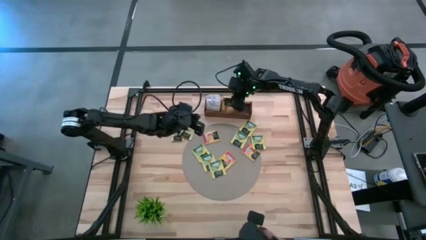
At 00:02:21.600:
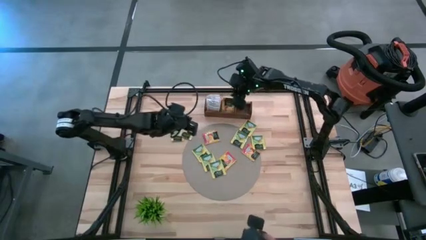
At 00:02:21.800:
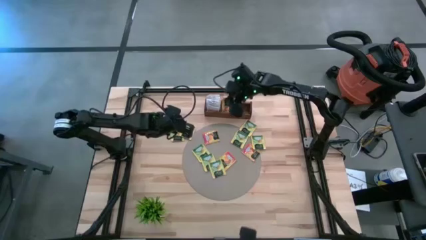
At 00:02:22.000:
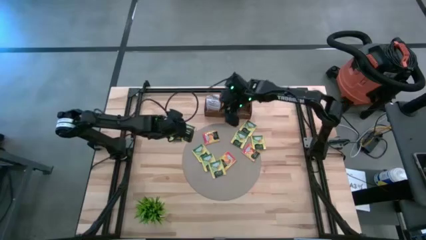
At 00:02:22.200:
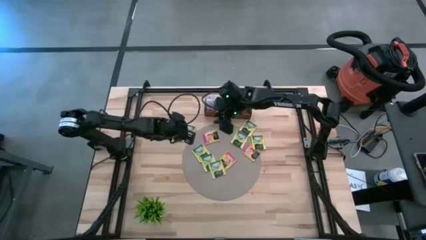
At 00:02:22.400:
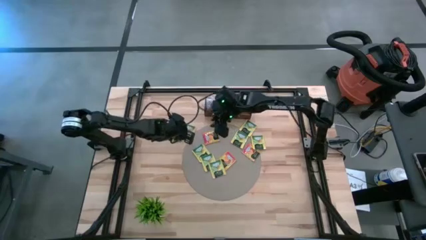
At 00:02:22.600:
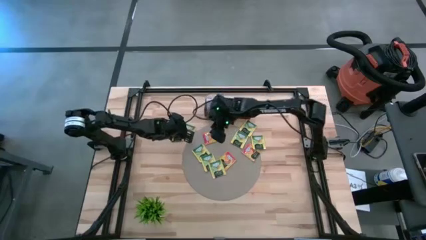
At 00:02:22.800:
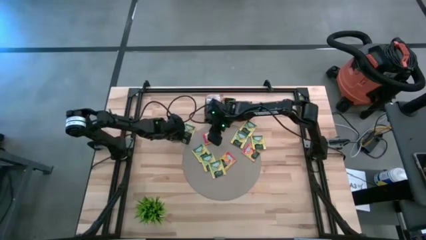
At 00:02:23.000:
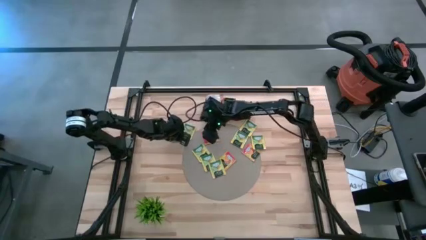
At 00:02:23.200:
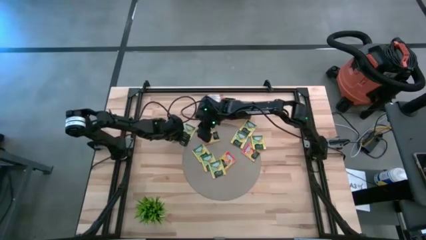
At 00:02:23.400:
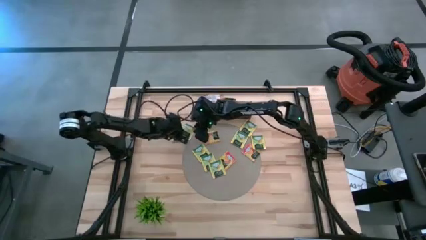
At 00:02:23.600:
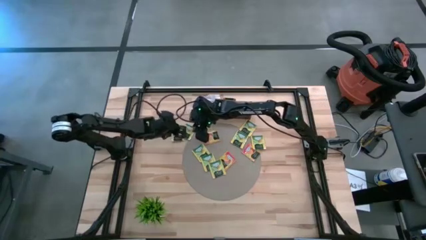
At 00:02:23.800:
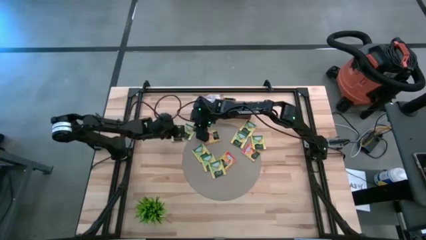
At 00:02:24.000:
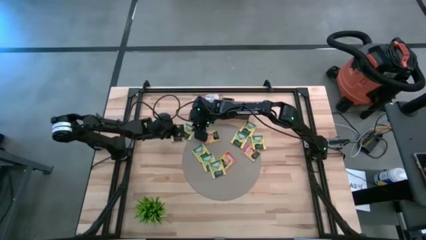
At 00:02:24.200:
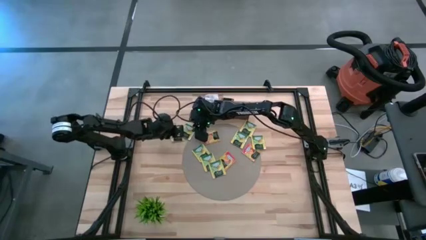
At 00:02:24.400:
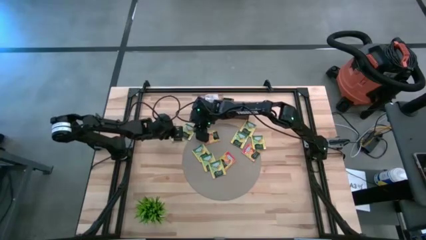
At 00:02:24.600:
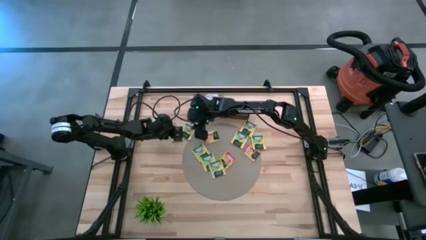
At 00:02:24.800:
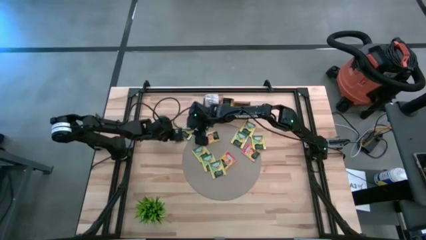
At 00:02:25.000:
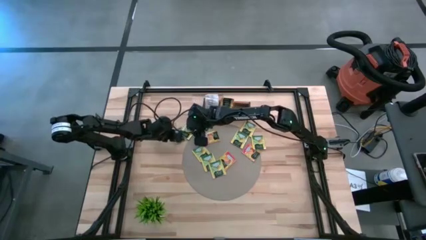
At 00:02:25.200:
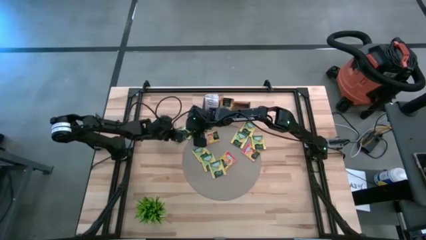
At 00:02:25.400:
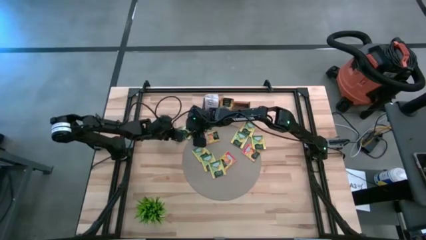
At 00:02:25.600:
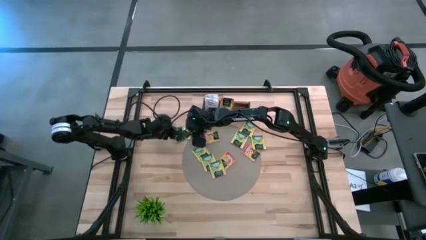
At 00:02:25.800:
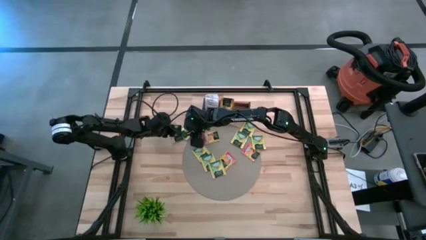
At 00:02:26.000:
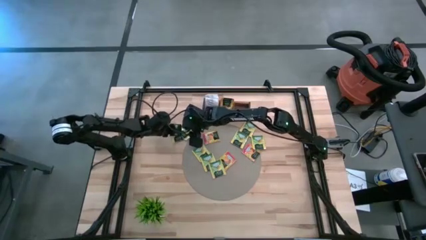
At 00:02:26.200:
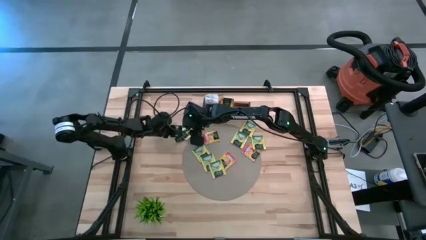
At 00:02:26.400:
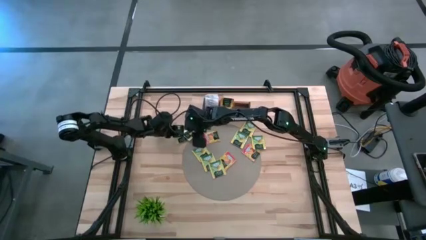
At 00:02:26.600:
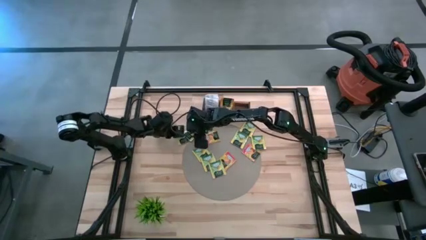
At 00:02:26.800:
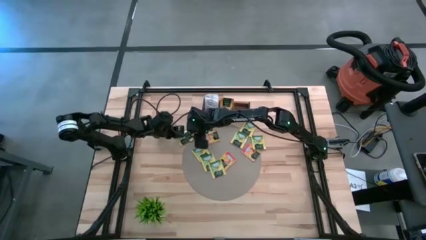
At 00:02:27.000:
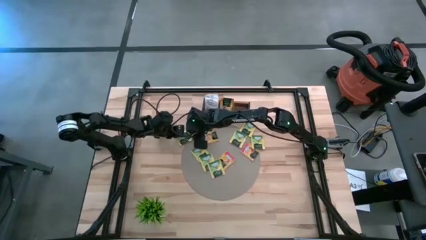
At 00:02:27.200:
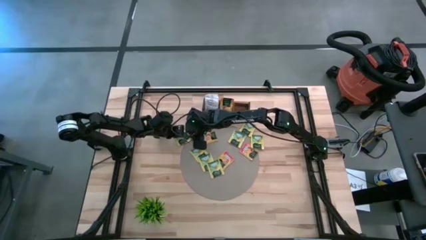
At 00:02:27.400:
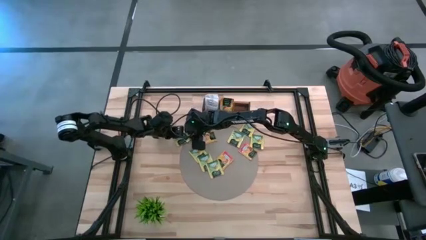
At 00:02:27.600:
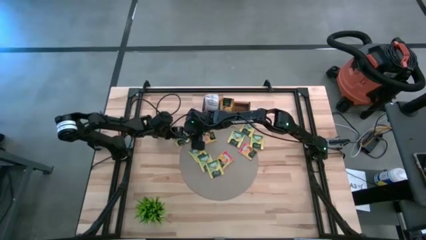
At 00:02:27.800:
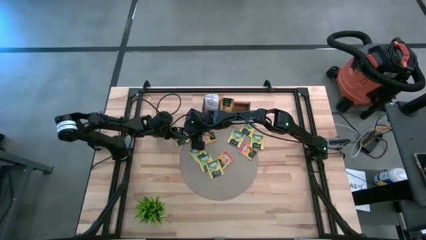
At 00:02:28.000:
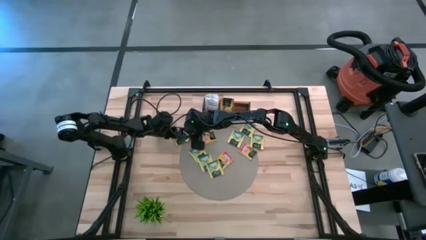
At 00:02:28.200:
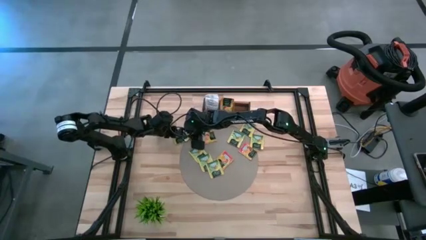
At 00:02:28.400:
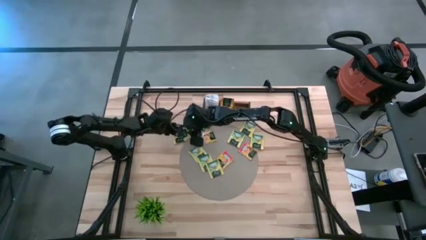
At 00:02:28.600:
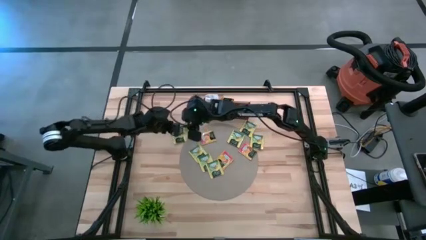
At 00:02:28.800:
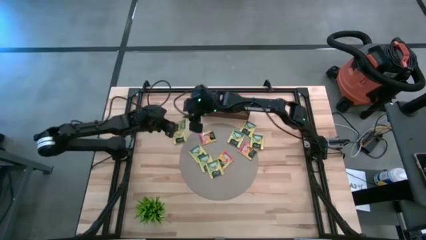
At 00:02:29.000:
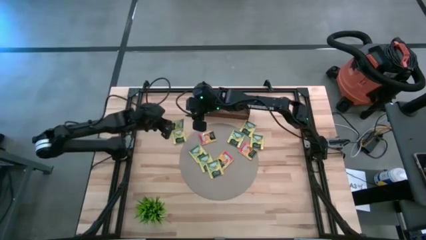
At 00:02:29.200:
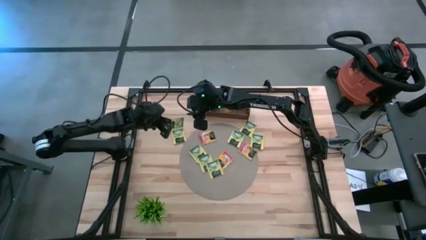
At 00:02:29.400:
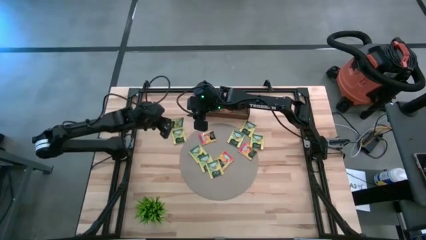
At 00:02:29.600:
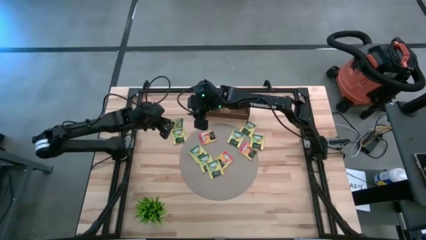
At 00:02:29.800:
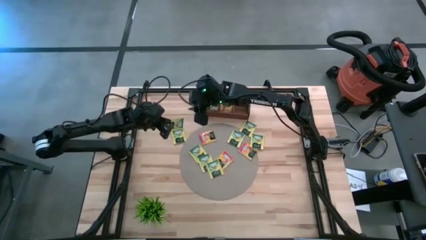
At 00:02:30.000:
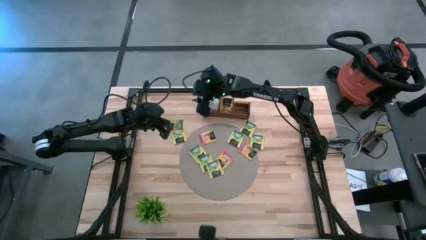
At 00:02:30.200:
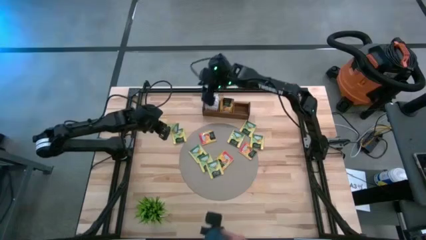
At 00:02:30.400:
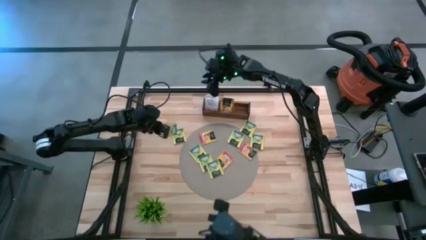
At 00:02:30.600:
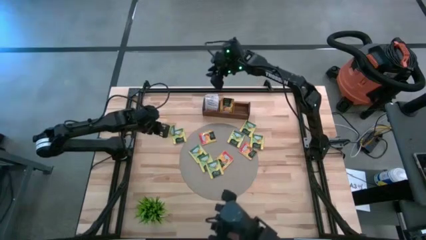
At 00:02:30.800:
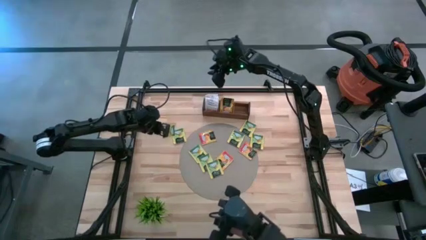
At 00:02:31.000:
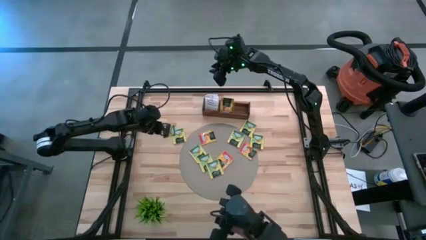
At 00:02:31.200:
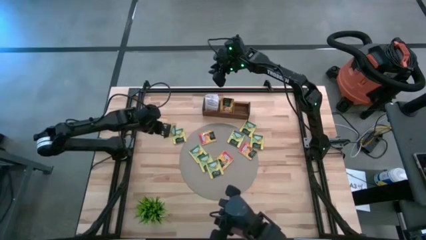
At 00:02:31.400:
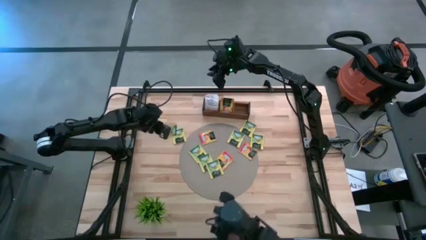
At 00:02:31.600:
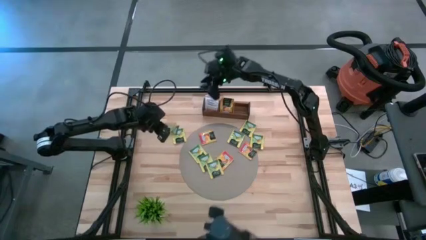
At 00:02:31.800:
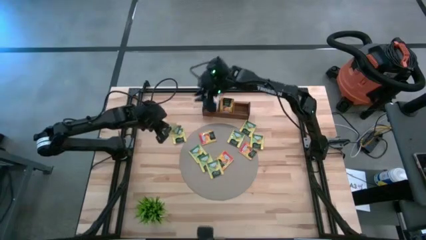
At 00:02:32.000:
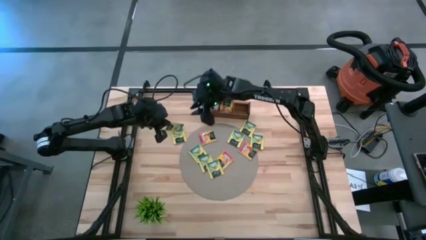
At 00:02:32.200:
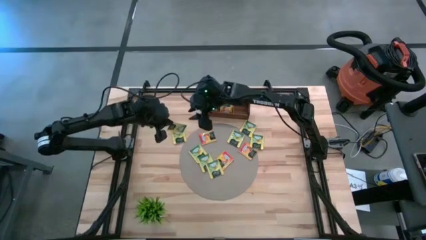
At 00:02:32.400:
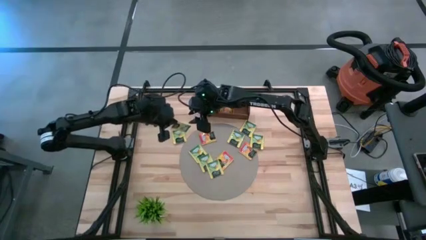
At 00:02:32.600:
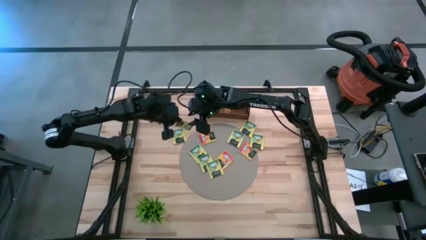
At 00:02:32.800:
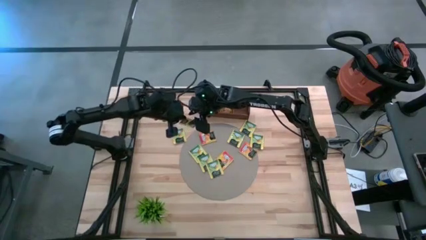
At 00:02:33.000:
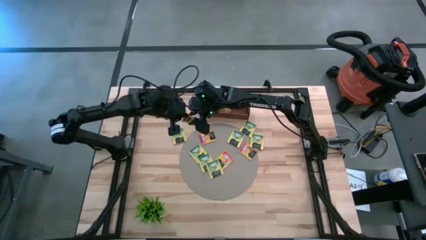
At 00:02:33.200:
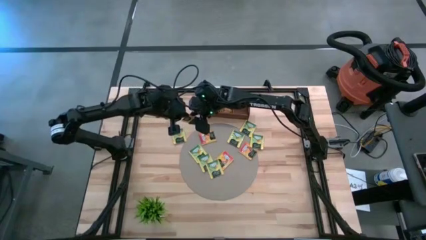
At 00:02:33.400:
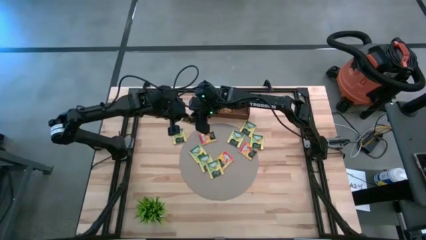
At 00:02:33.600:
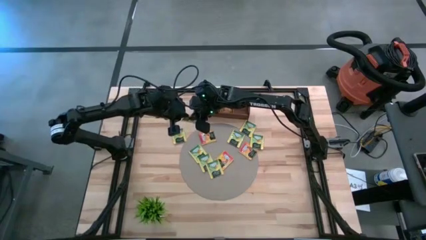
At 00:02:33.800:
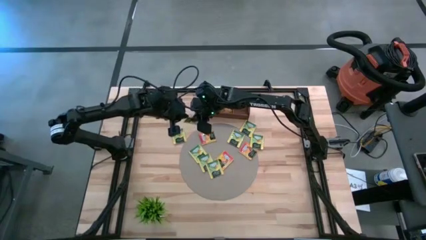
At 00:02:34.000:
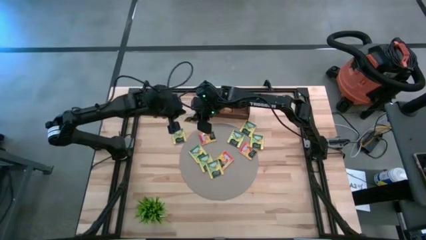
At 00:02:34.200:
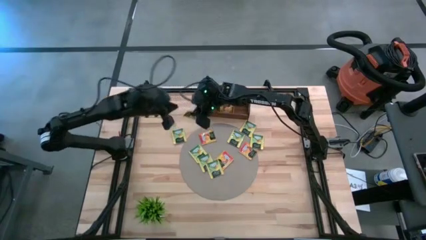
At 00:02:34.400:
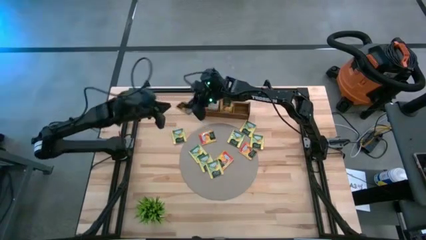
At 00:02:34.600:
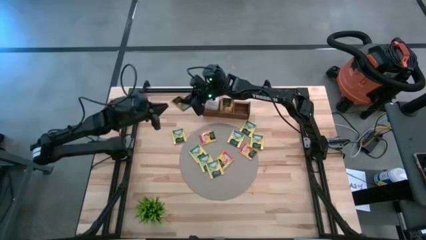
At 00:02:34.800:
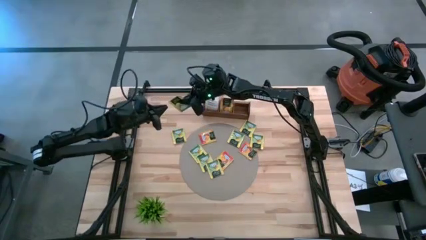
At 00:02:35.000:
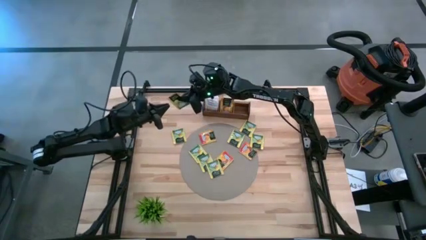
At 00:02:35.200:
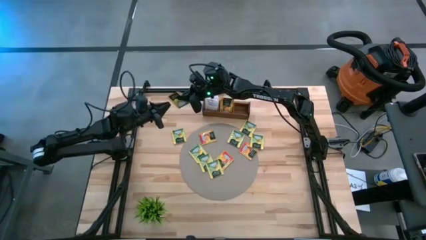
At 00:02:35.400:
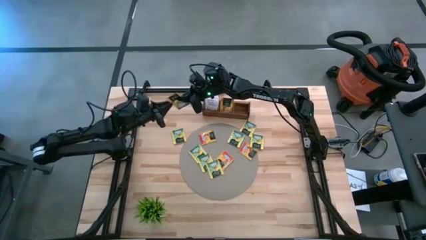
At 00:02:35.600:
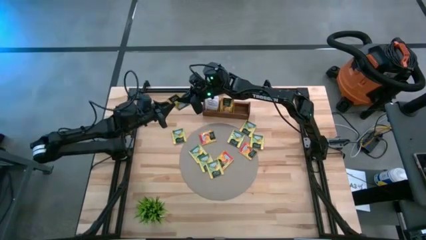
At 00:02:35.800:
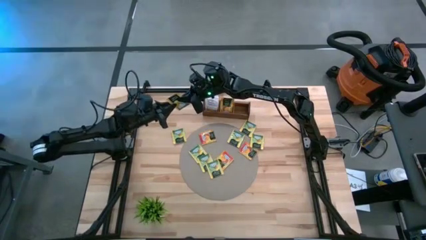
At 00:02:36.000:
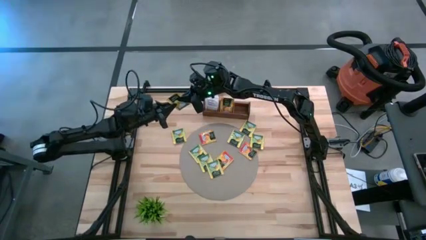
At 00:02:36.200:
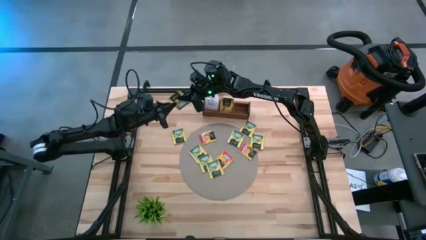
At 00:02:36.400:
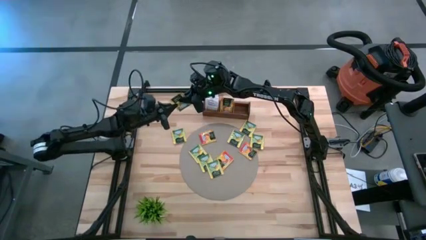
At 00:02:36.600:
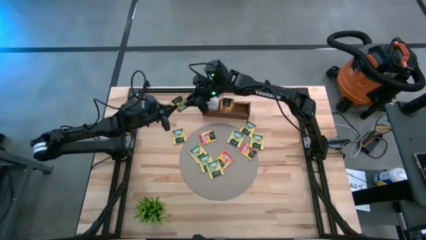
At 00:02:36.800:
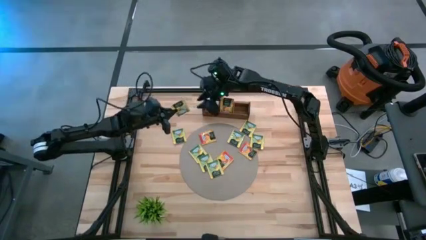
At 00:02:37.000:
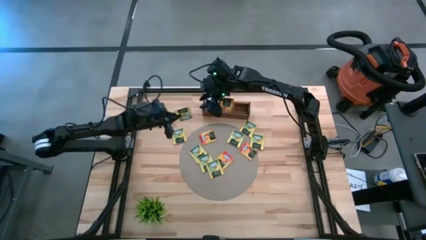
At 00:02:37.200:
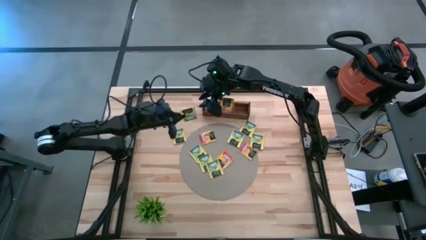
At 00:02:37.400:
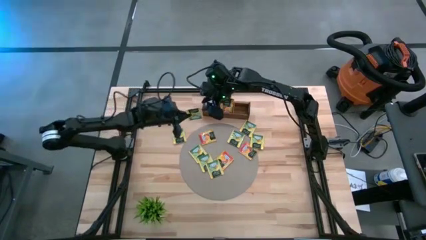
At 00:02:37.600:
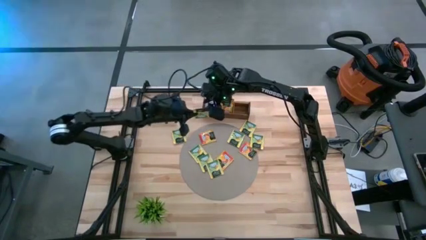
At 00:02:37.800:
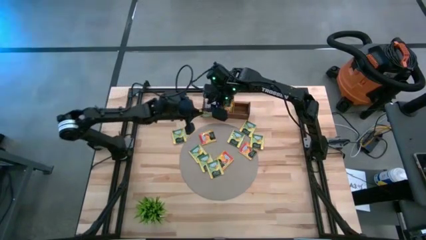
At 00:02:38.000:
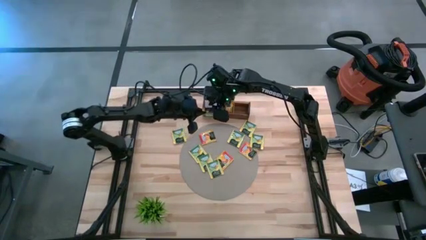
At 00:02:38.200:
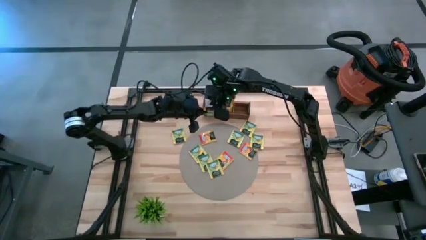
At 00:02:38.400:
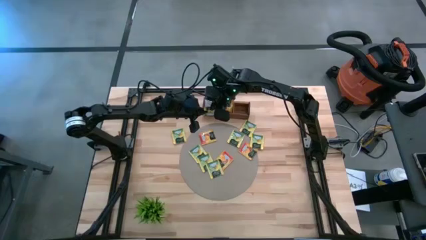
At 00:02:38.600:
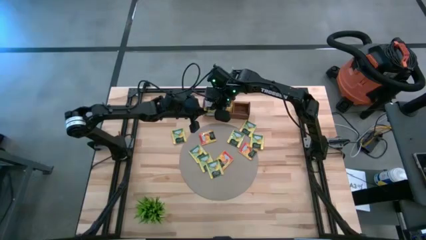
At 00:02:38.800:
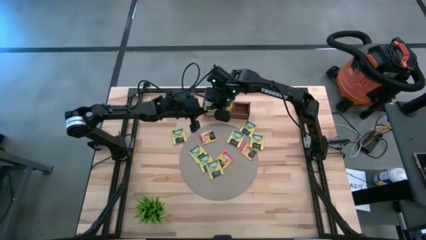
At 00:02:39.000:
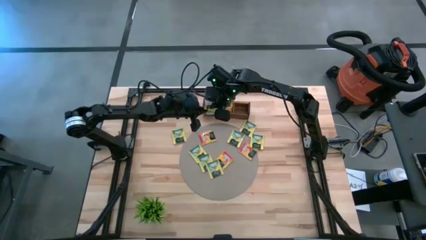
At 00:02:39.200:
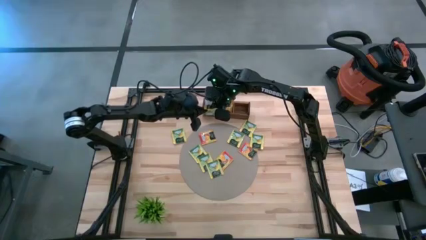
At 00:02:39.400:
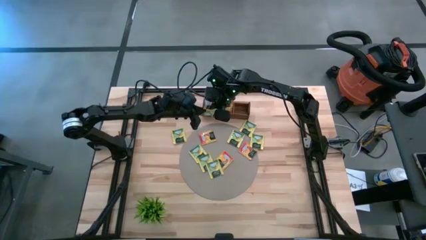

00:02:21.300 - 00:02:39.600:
Task: Pick & Place Tea
Put the yellow tea bag into the right section of the wooden organizer
